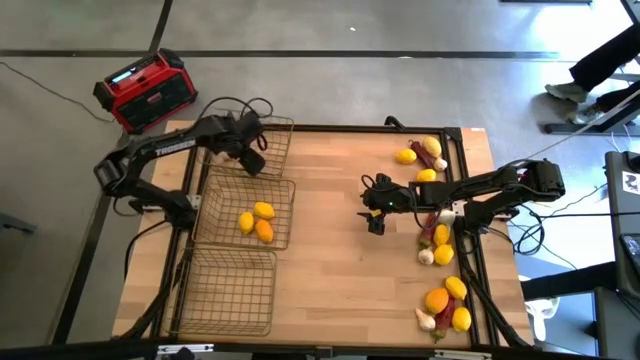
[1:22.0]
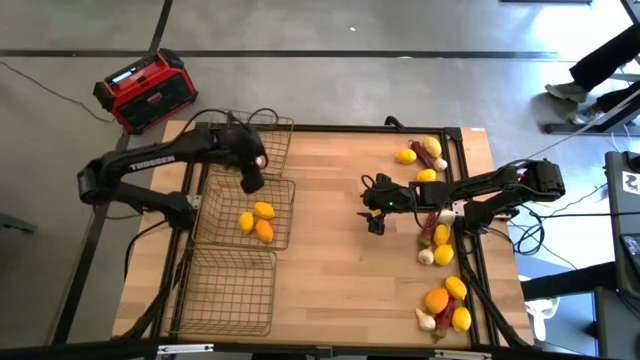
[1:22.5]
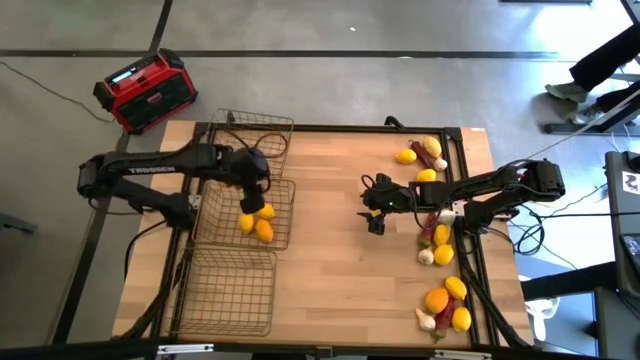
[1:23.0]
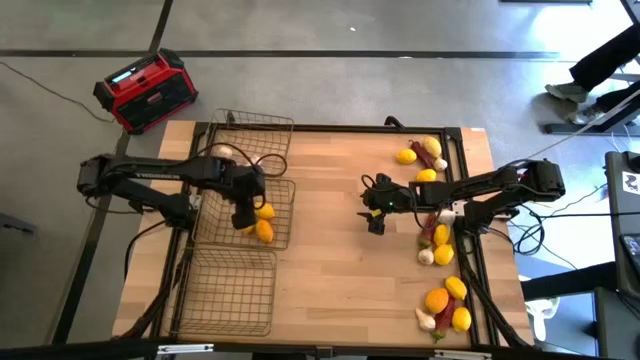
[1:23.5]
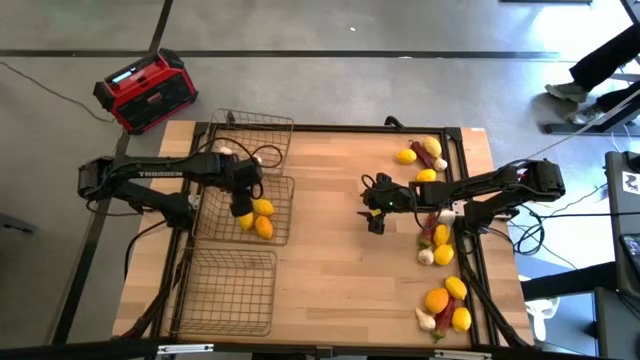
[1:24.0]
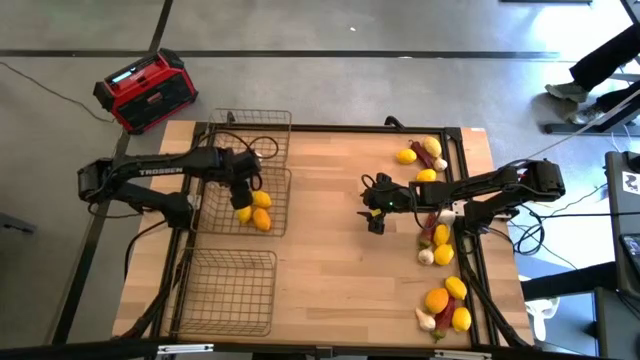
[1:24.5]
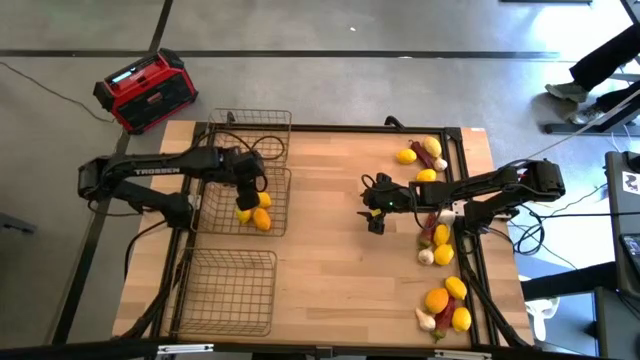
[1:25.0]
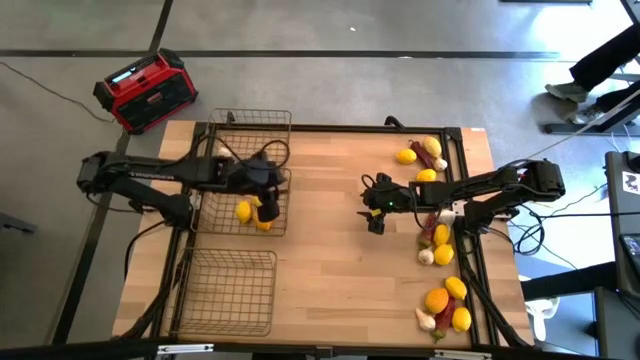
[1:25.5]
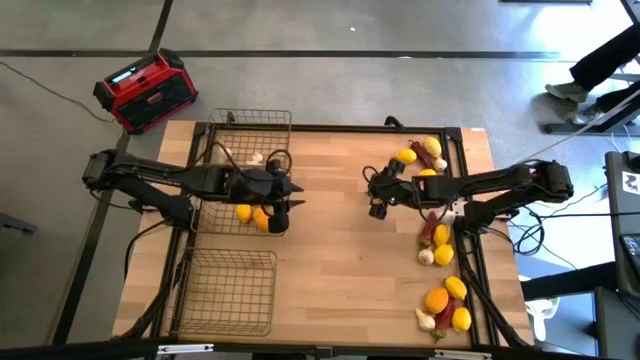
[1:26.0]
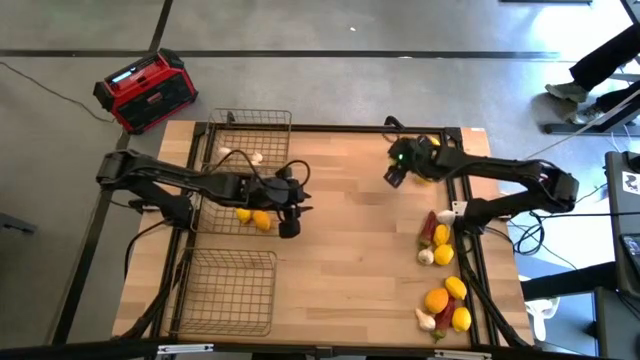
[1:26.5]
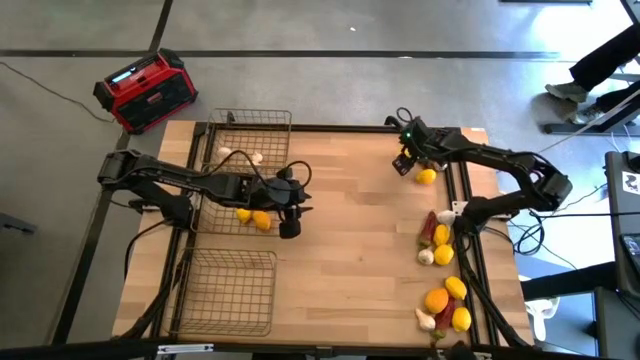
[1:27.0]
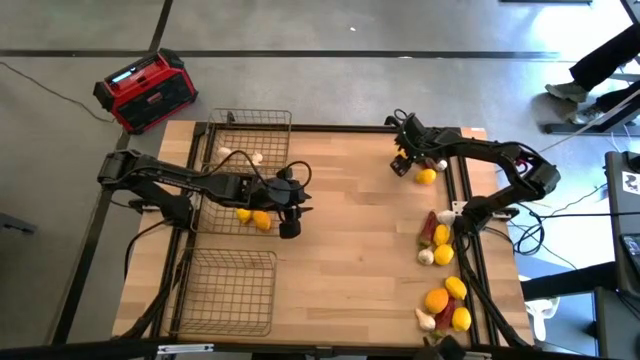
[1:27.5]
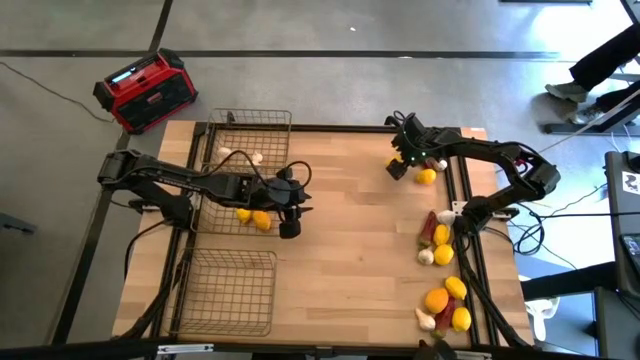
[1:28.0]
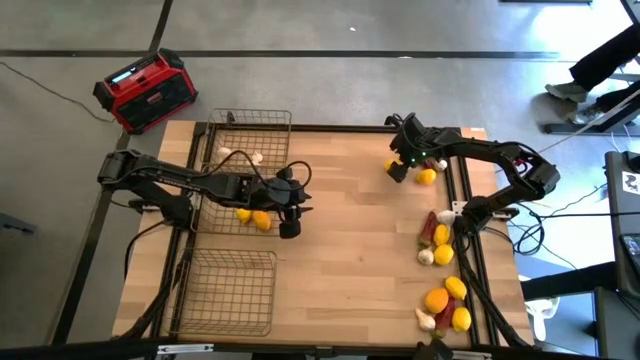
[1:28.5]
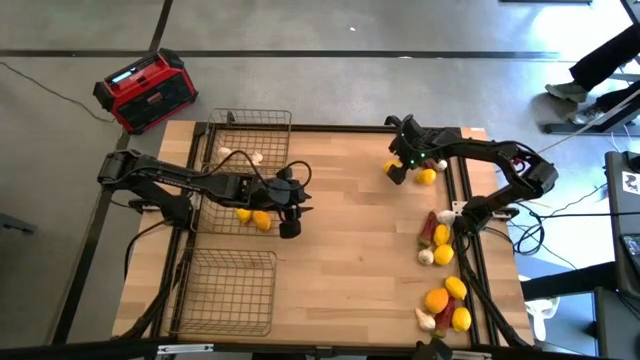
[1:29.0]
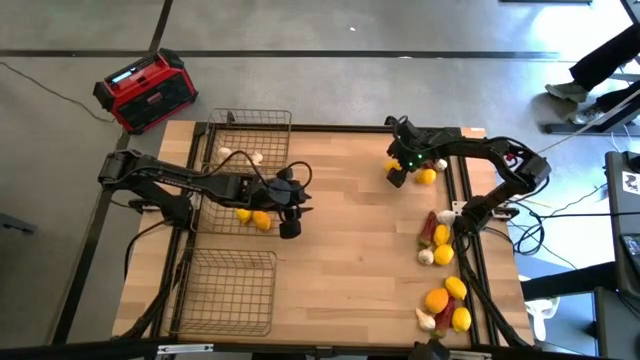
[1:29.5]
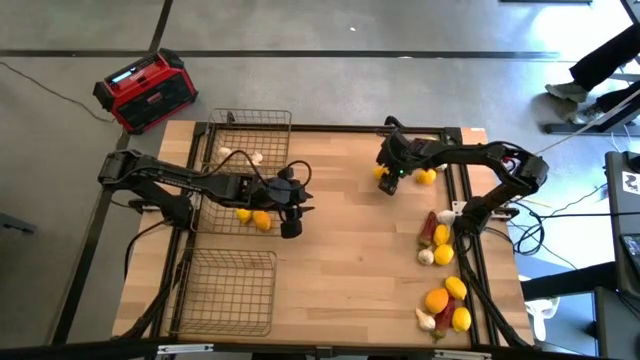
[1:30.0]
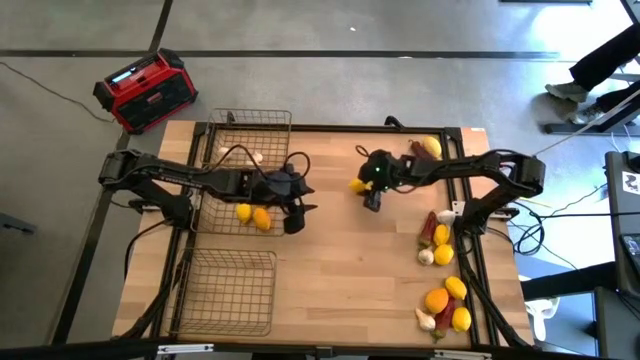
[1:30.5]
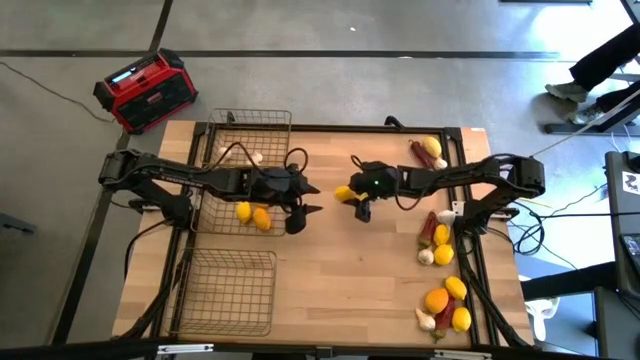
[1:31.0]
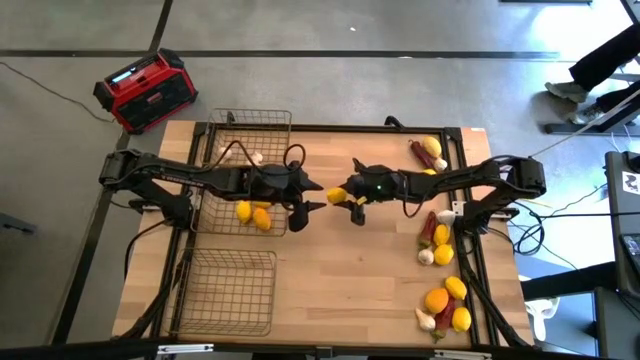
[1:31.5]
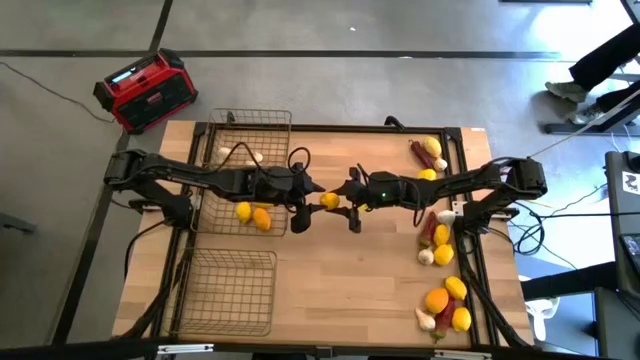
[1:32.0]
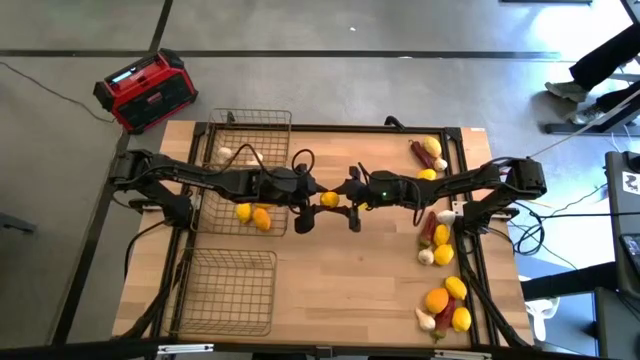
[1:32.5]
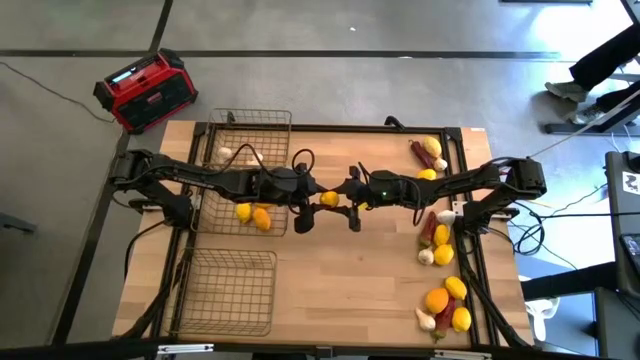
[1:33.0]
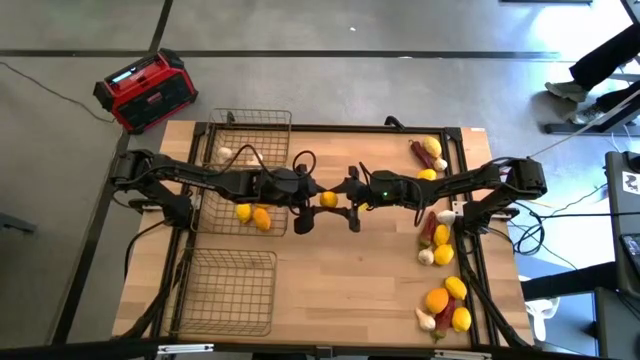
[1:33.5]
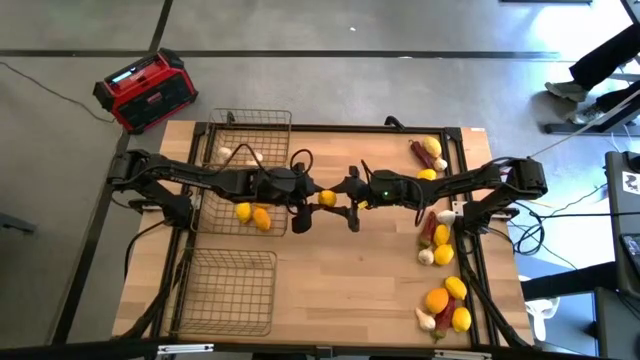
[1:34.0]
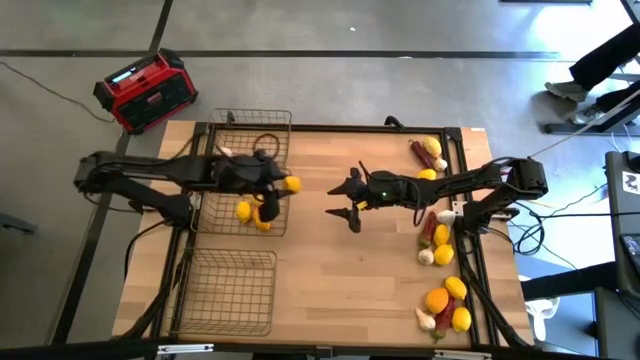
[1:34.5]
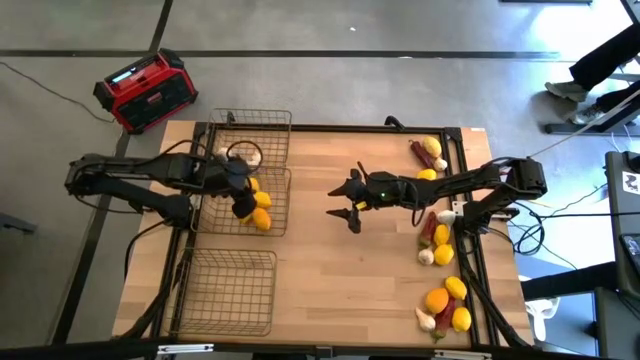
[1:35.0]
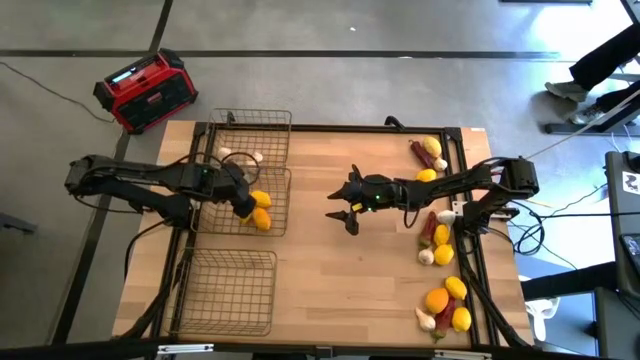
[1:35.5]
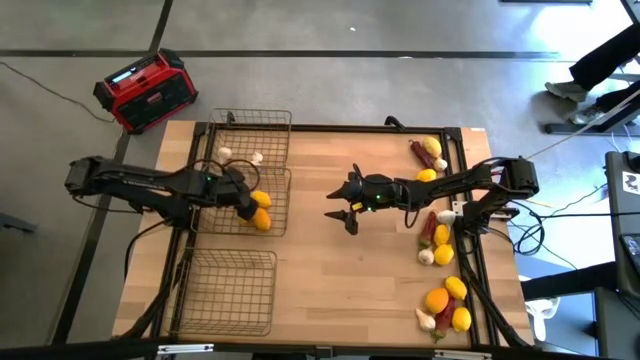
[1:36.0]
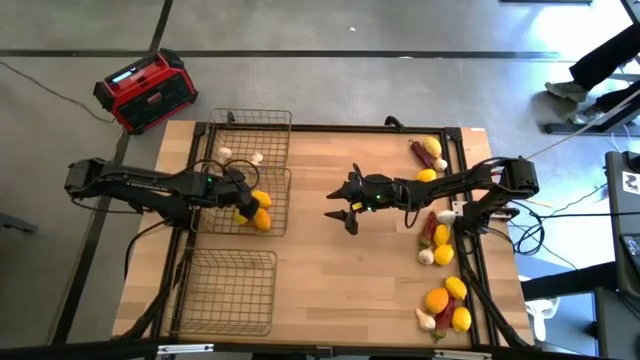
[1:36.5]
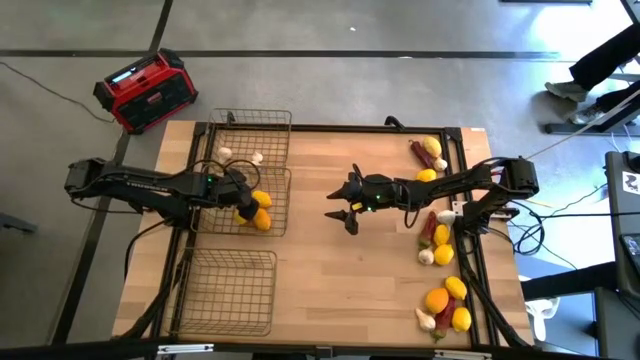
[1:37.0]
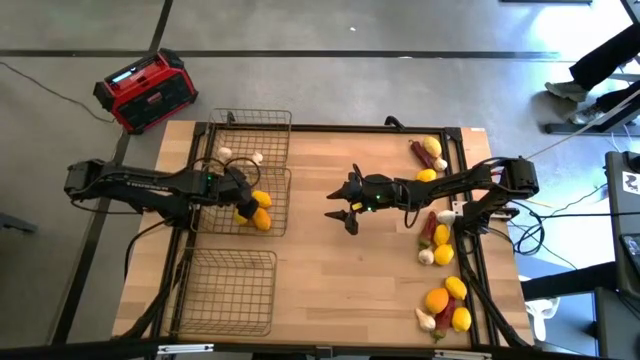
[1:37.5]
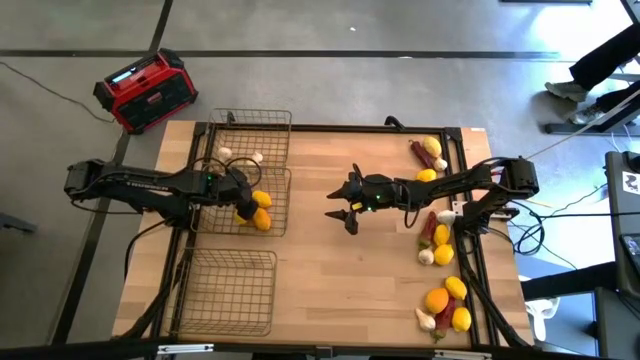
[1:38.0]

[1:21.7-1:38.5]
Task: Sort produce into baskets
Put the lemon in the middle wire basket

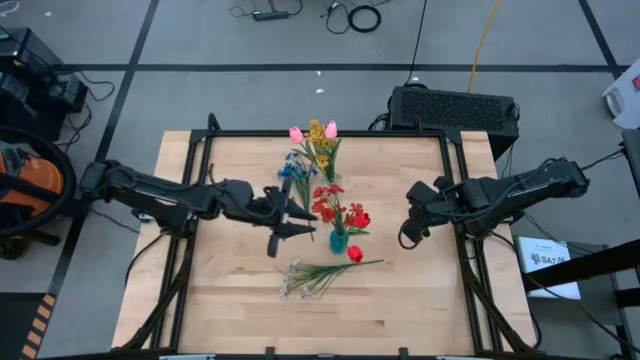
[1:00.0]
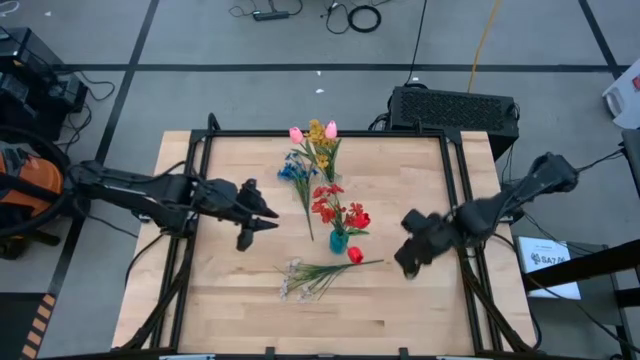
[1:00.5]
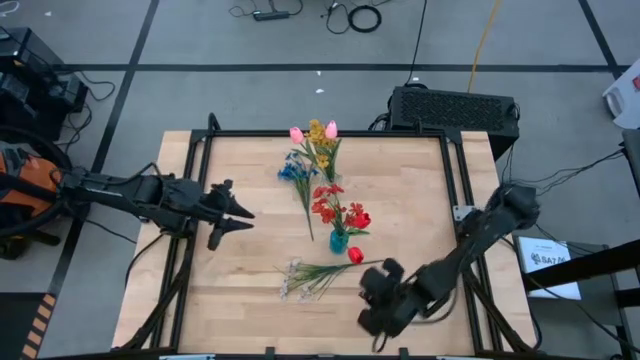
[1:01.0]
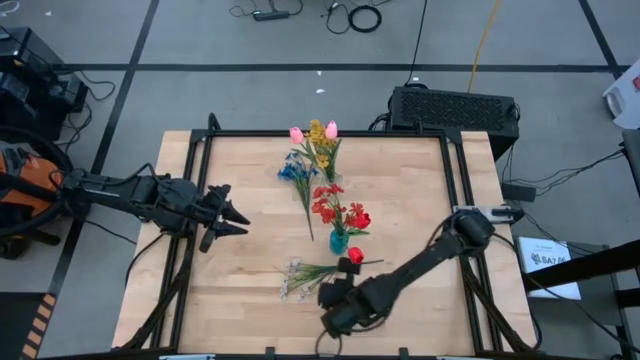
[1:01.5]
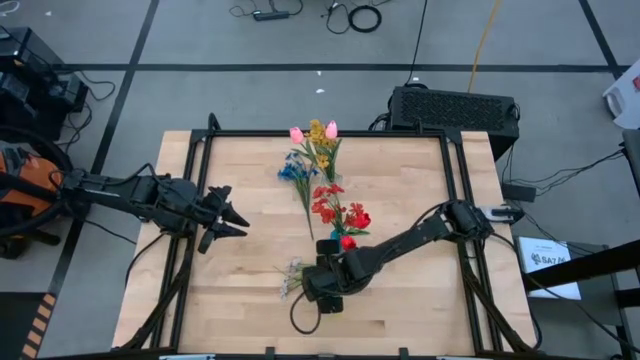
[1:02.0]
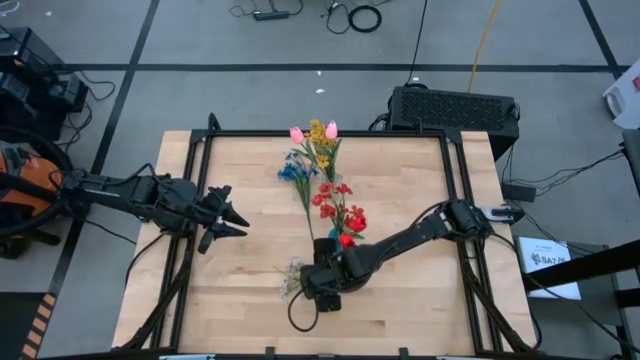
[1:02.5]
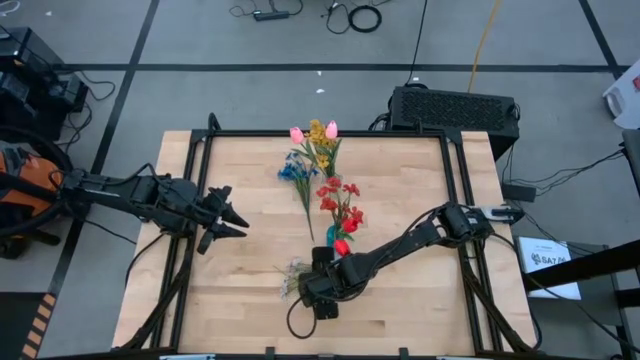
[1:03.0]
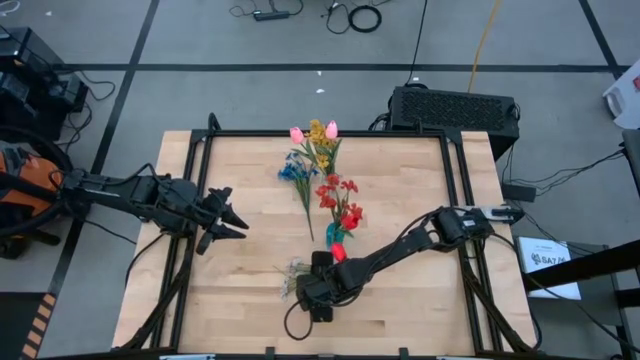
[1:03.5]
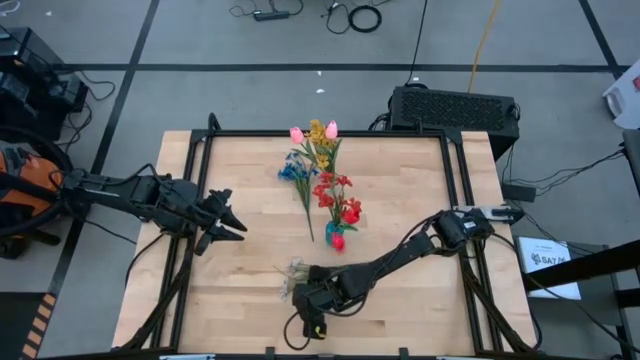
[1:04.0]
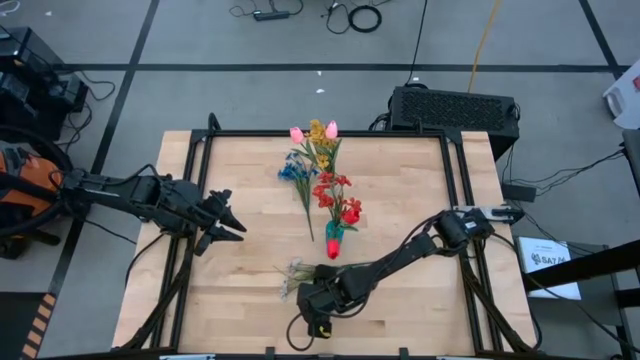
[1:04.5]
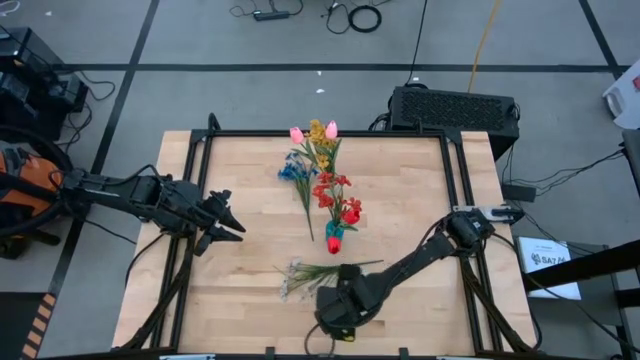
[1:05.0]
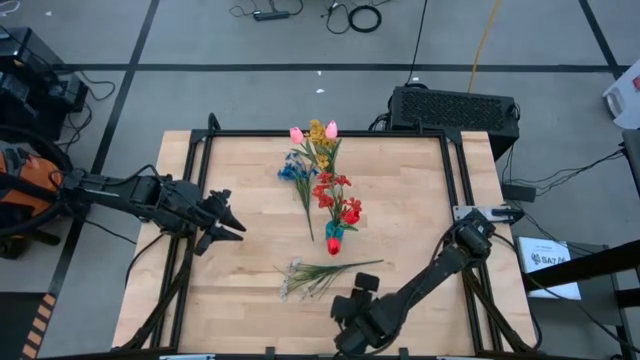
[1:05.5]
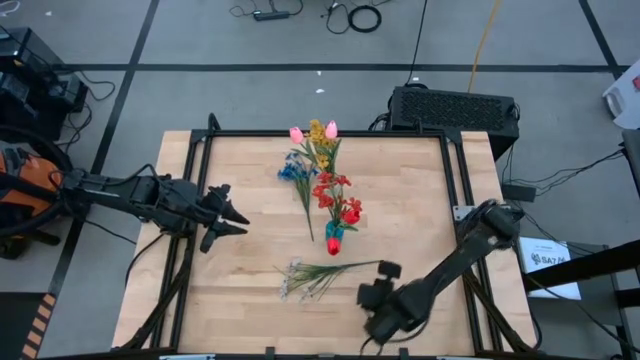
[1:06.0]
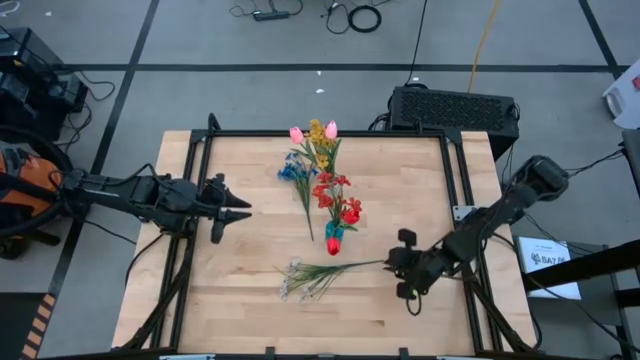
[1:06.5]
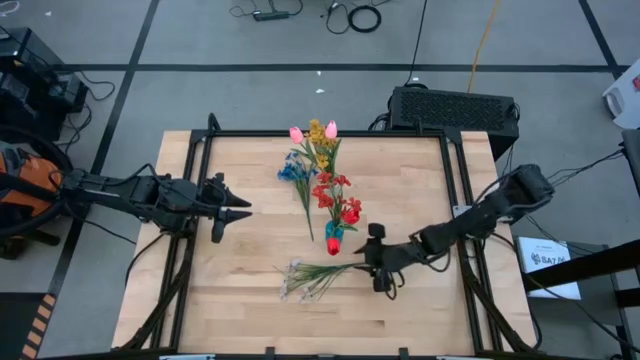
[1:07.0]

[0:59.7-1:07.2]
Task: Sort flowers into vase by color
Put the white flowers into the transparent vase
